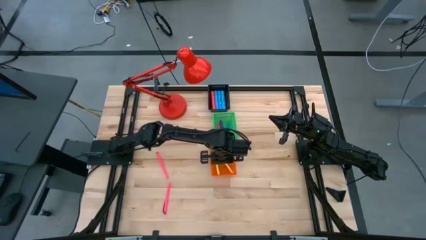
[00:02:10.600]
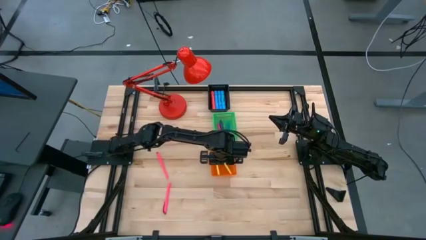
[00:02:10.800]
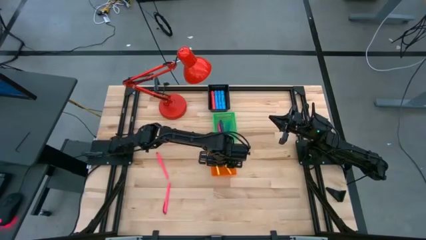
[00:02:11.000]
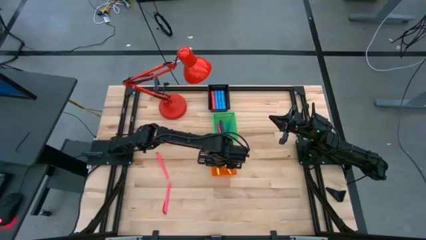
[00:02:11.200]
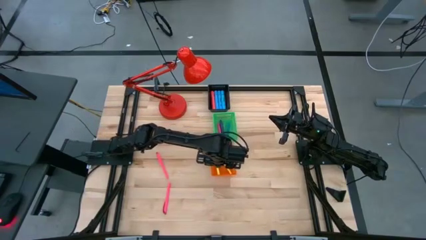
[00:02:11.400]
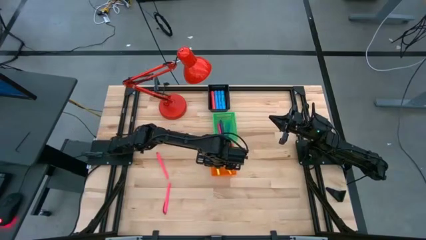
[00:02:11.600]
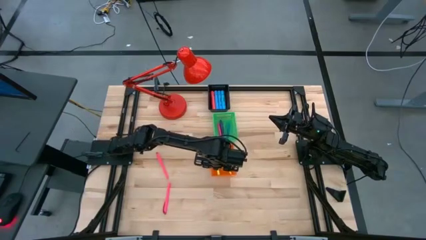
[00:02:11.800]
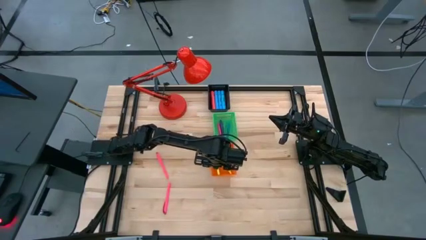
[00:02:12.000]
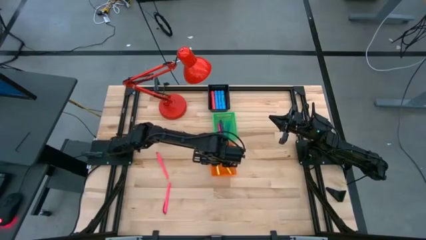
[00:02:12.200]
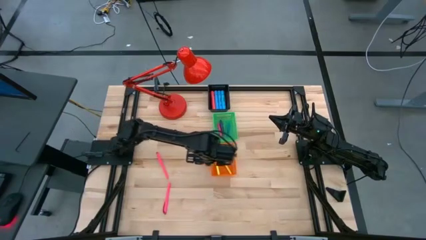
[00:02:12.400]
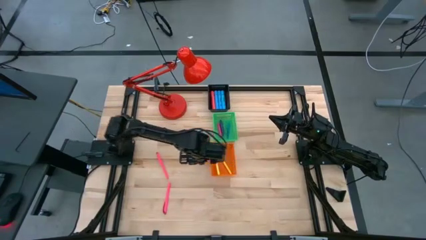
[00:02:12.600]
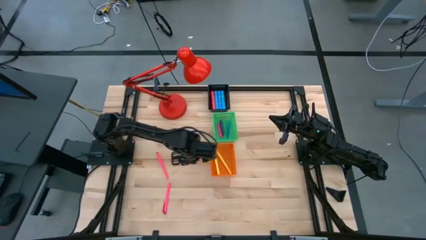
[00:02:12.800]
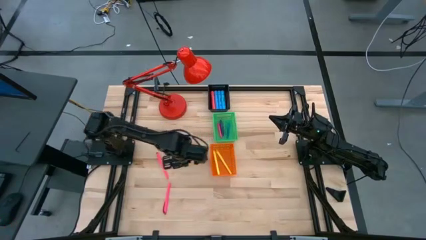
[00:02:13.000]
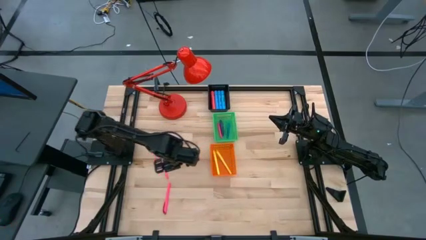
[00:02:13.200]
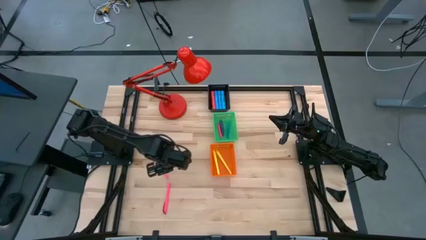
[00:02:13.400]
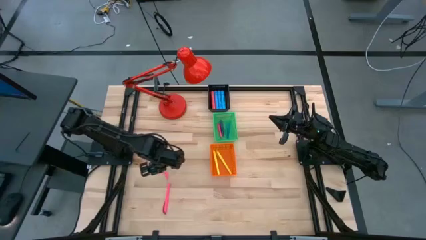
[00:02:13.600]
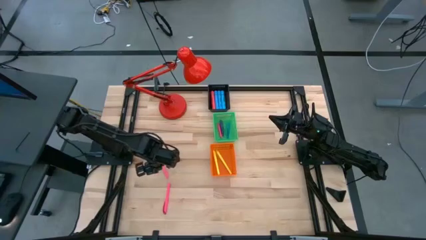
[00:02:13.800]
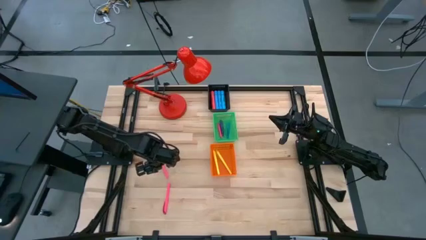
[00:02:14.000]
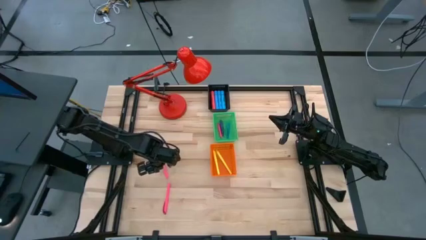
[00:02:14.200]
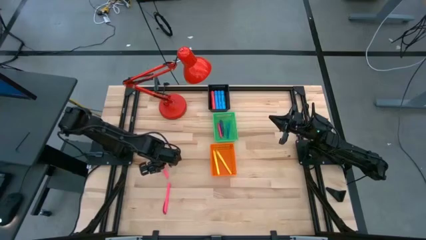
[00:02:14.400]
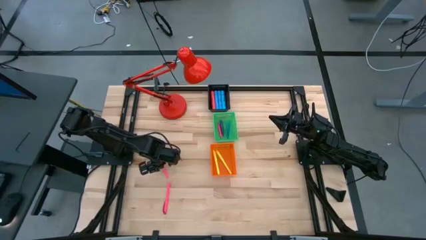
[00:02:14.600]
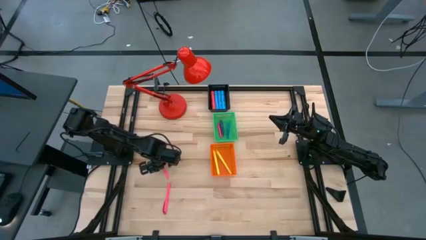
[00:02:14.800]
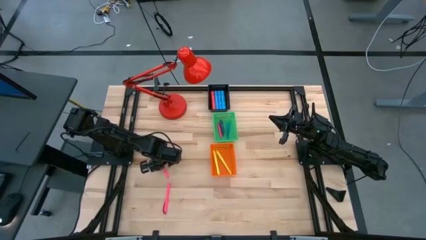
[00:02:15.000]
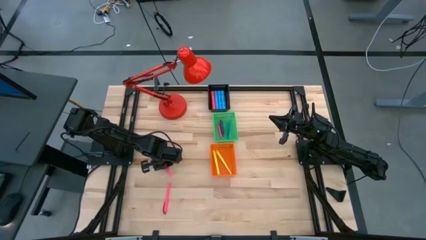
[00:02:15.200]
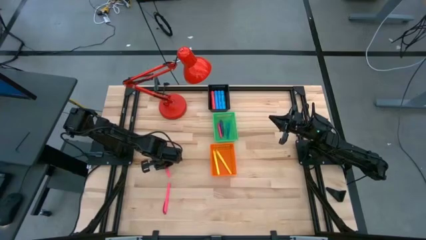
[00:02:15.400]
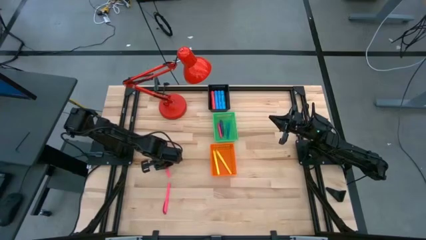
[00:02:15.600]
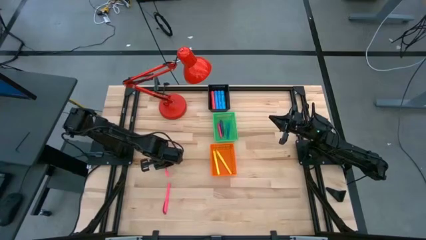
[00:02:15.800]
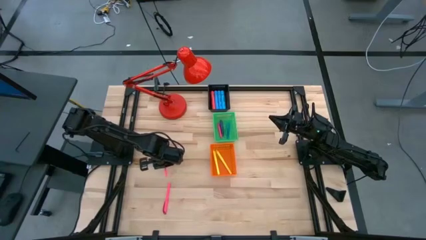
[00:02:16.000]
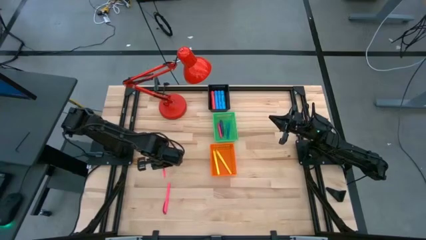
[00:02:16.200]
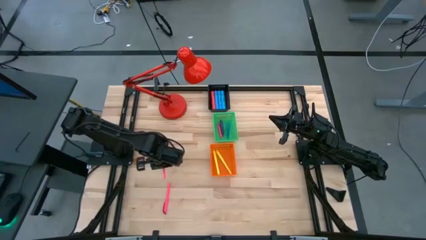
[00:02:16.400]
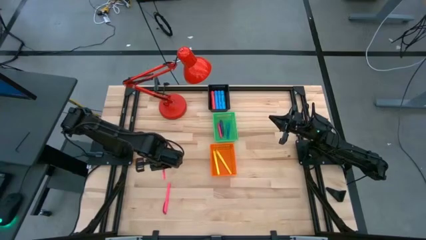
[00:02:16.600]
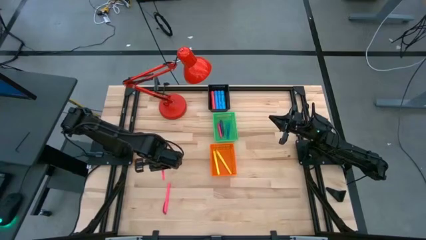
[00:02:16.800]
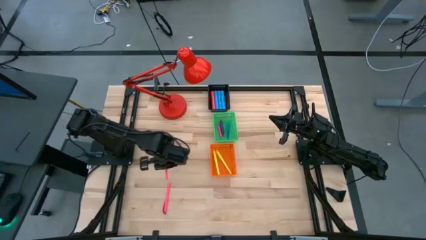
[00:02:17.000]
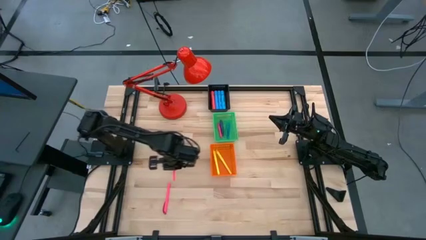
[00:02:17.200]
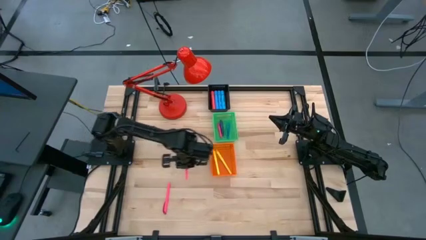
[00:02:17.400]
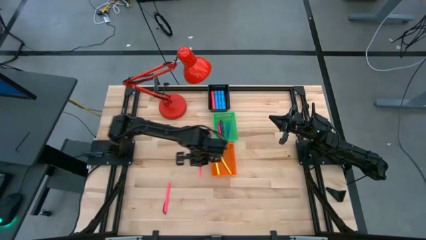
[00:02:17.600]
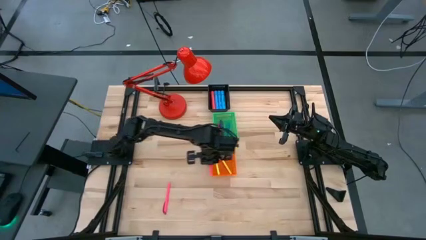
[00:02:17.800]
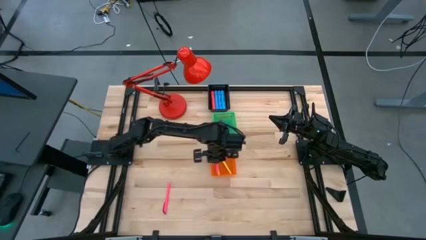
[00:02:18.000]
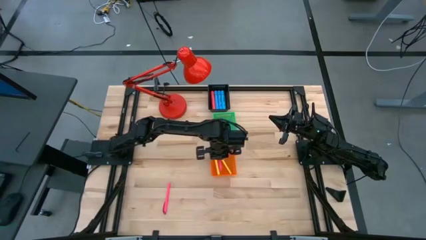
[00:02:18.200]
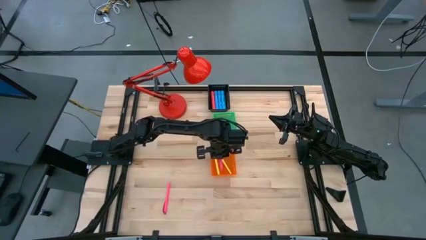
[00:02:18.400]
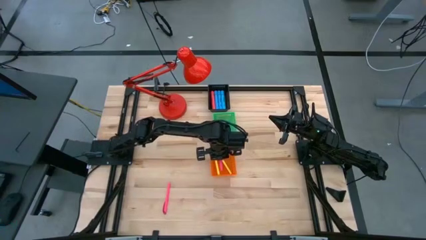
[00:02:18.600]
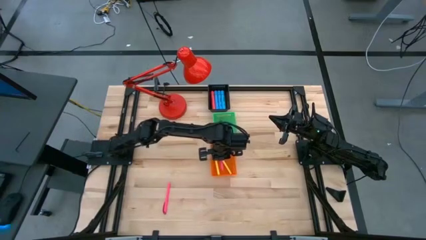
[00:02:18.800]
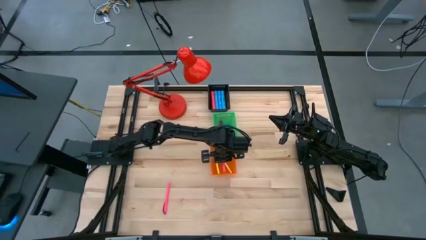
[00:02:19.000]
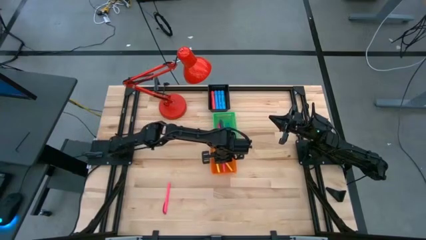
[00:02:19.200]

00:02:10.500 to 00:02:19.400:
Task: Pick & Place Markers
Put the top pink pen into the orange bin

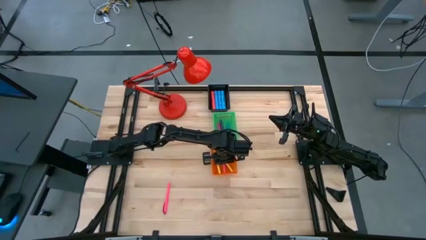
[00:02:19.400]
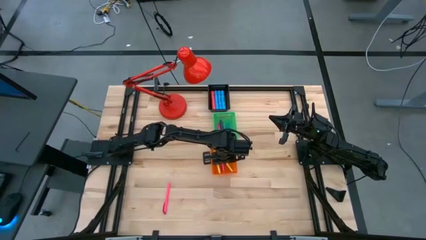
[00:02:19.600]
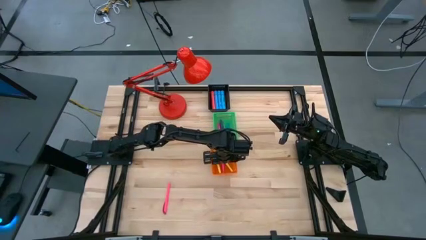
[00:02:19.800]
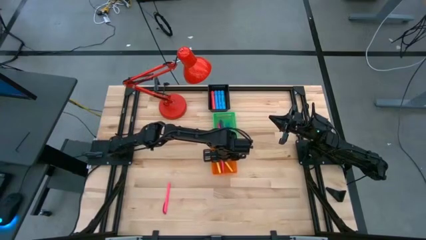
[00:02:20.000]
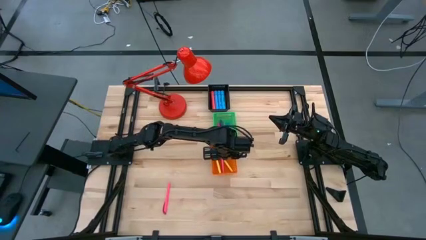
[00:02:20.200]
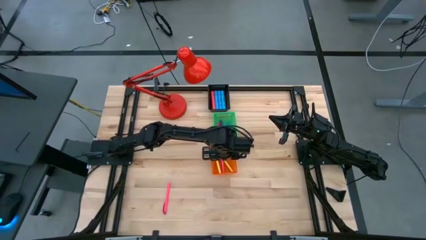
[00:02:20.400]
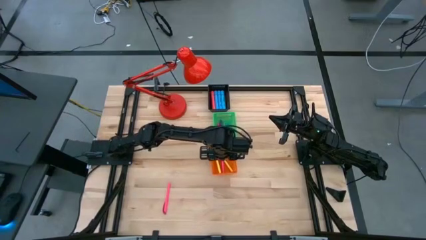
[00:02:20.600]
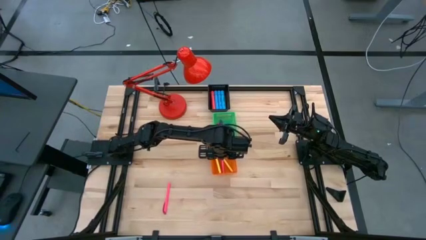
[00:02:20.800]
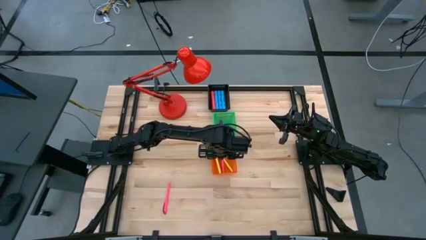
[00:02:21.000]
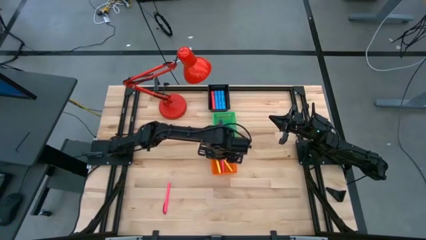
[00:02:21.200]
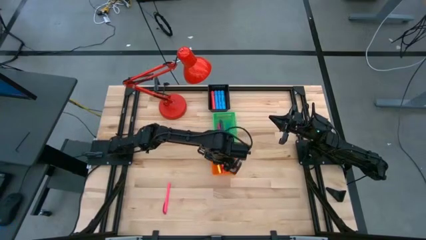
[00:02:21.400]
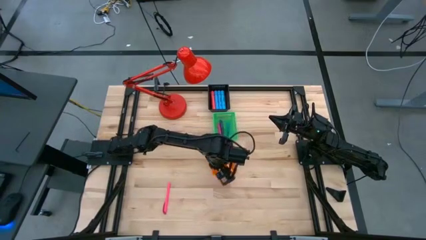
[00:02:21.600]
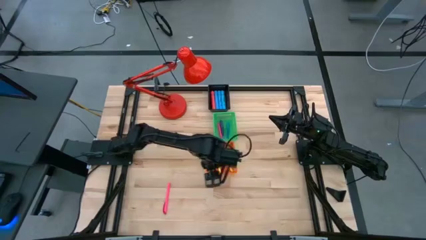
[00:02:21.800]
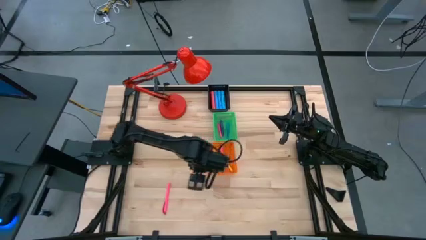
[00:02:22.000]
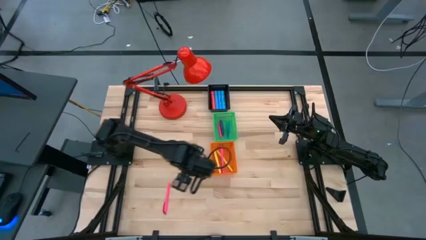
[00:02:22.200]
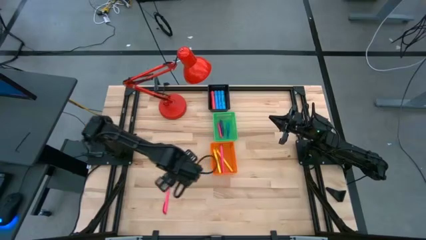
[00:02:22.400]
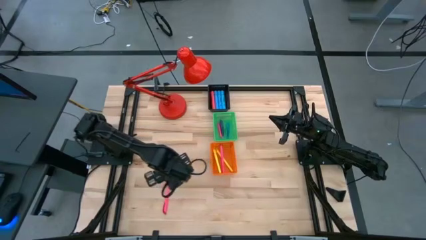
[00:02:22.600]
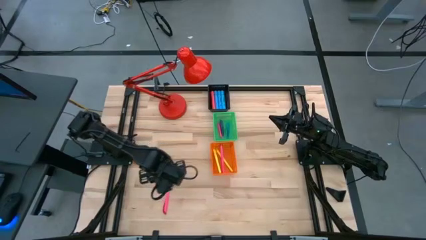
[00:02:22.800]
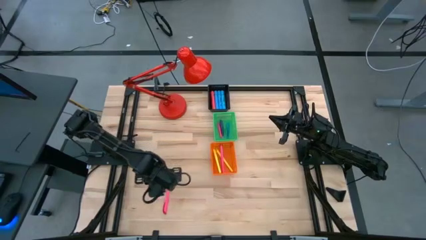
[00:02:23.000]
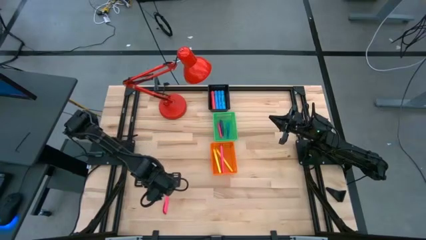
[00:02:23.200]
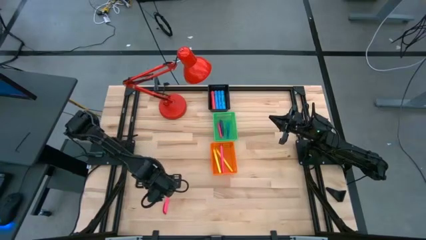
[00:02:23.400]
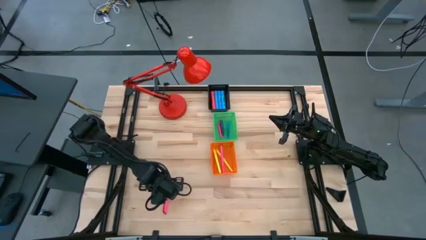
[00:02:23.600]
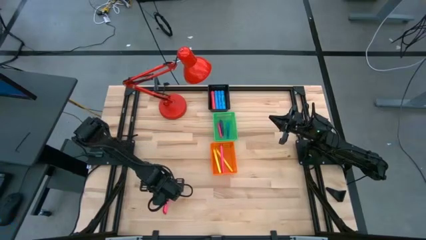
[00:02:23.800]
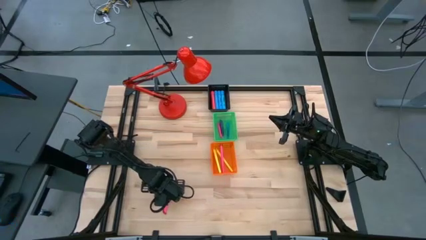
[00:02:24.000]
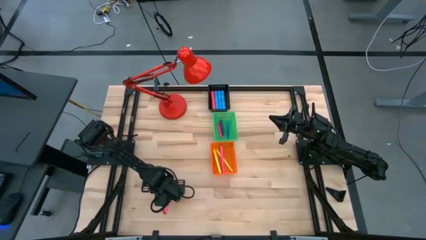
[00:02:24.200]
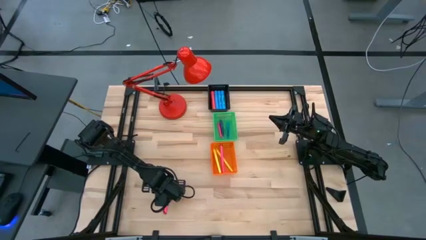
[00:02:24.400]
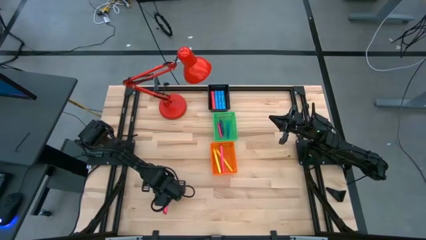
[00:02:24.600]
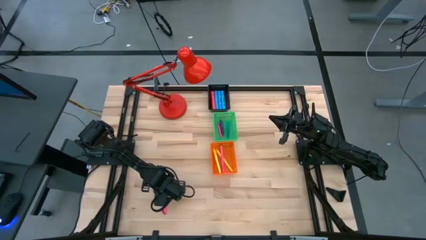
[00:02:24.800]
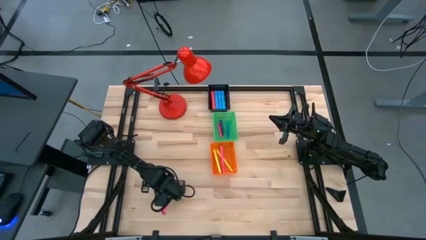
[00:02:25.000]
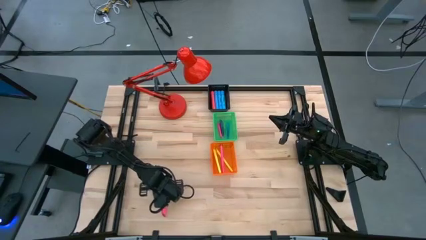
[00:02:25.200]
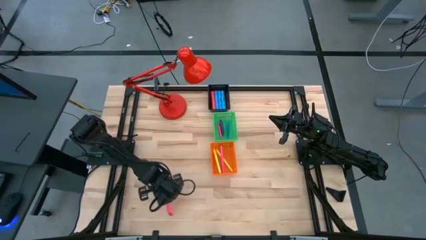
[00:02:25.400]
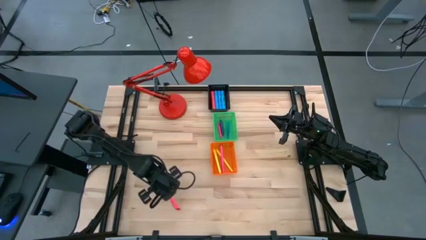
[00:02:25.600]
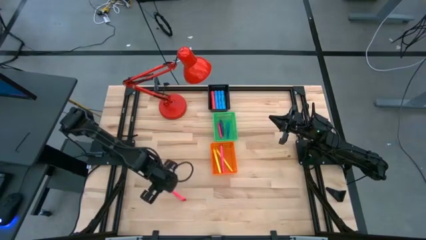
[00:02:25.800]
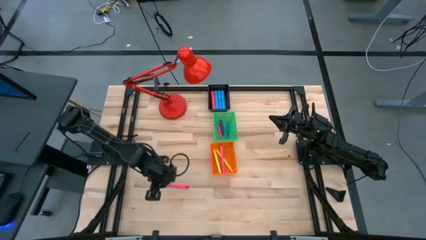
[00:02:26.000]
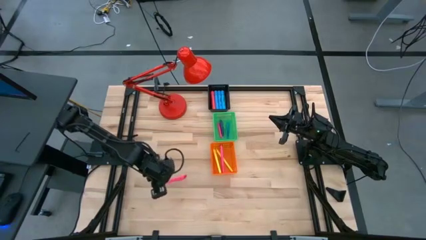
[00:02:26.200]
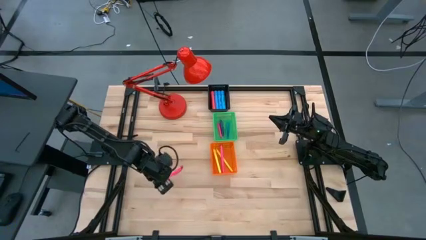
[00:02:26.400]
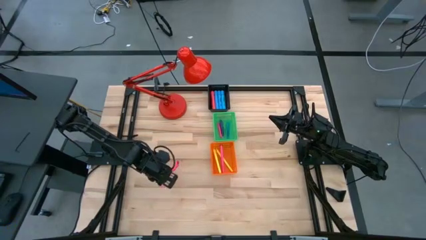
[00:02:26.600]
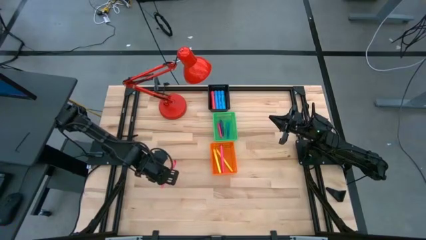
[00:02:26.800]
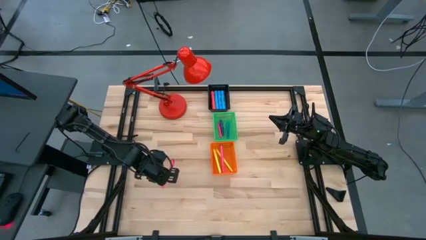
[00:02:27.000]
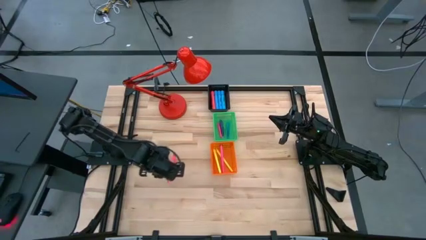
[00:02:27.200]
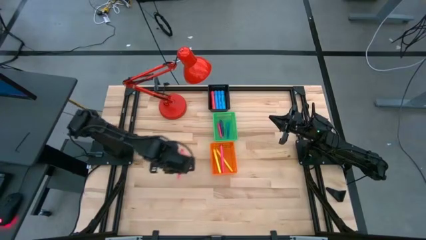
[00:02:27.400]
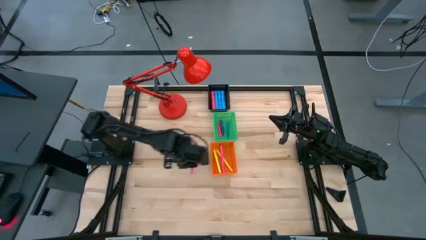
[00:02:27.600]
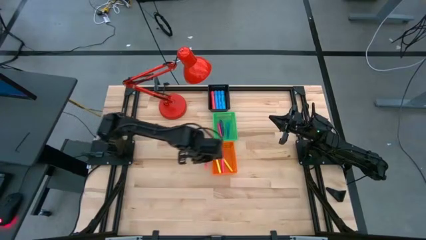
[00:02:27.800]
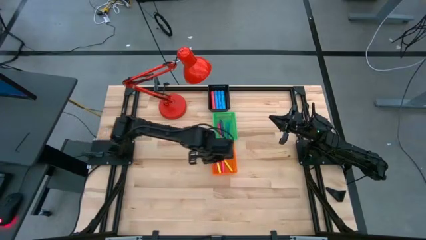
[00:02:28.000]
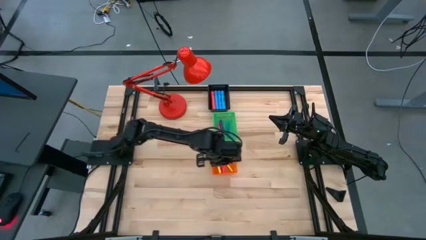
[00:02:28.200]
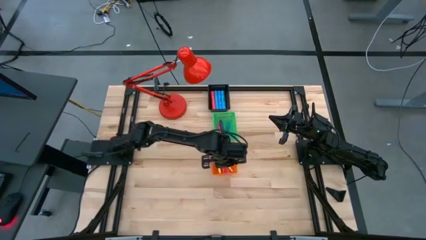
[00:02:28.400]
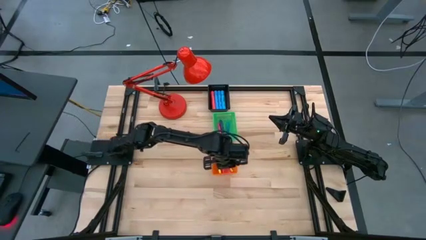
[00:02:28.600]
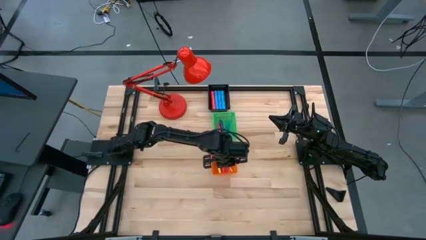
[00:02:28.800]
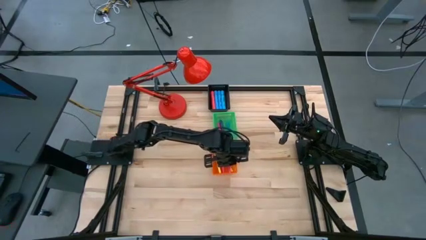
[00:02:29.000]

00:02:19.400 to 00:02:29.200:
Put the pink pen into the orange bin
